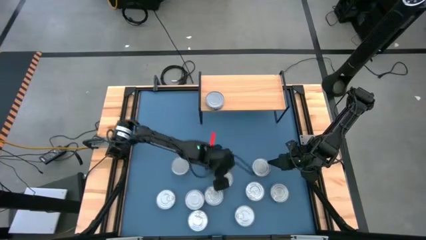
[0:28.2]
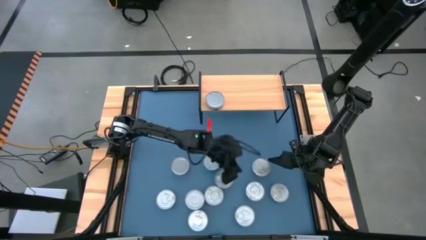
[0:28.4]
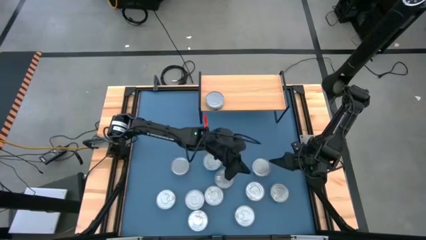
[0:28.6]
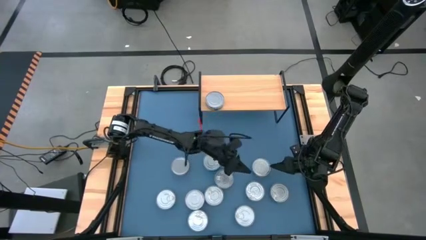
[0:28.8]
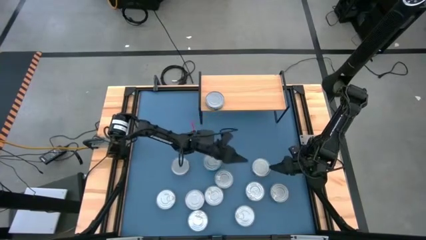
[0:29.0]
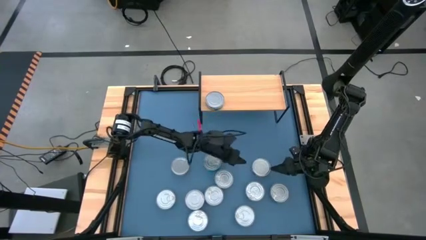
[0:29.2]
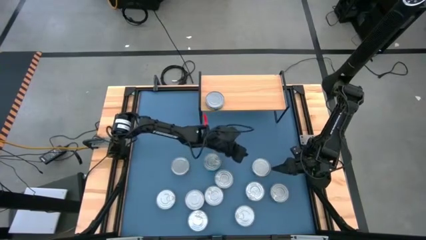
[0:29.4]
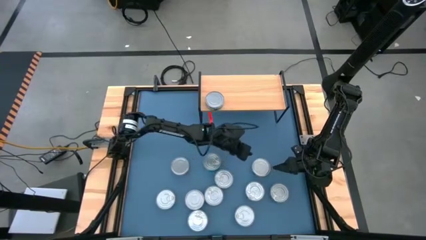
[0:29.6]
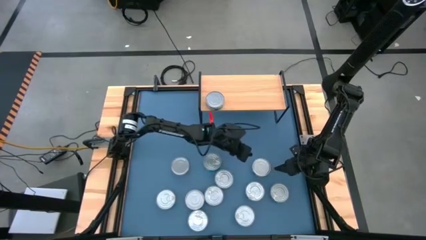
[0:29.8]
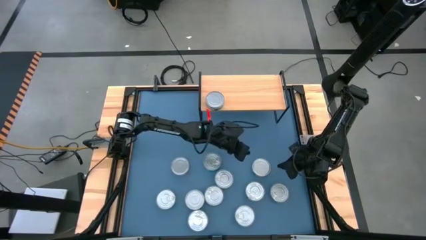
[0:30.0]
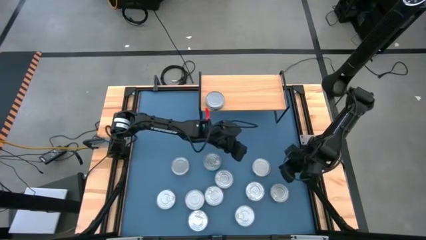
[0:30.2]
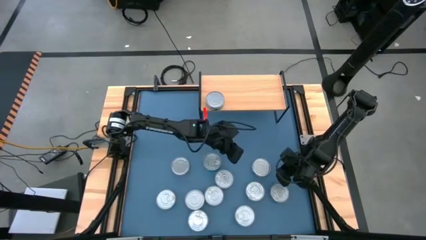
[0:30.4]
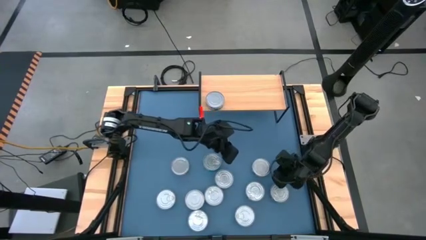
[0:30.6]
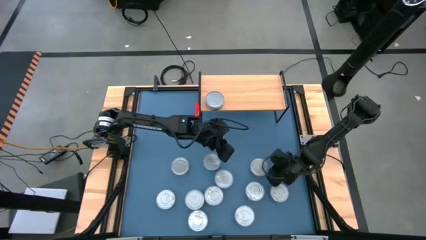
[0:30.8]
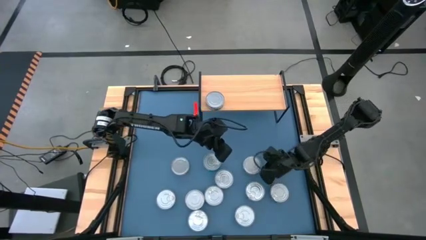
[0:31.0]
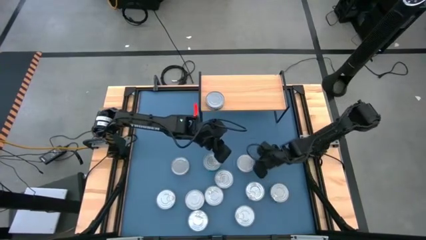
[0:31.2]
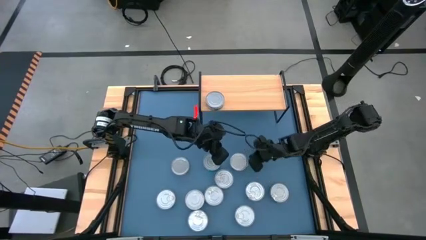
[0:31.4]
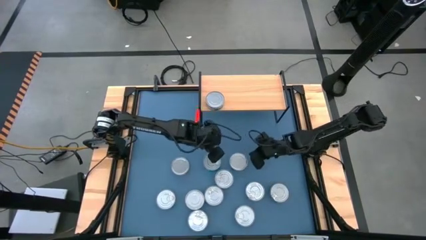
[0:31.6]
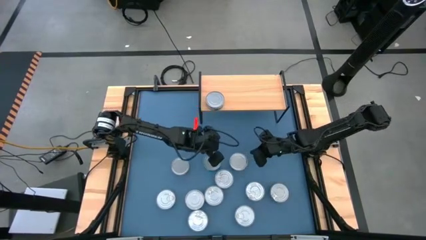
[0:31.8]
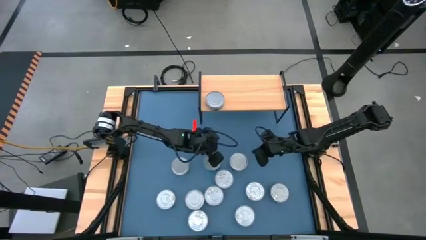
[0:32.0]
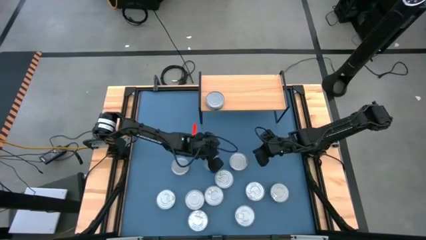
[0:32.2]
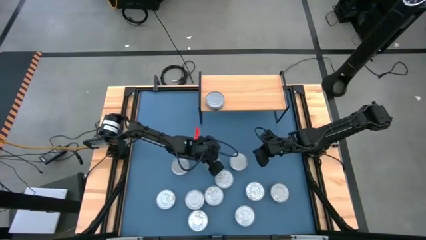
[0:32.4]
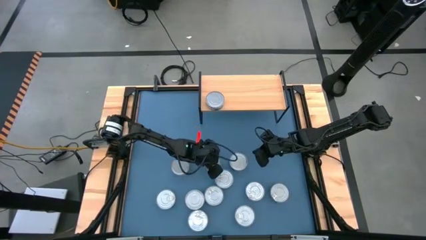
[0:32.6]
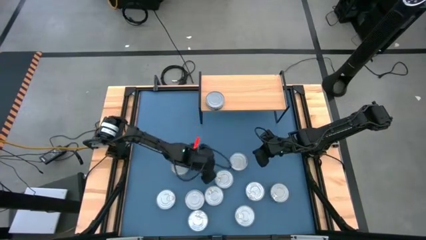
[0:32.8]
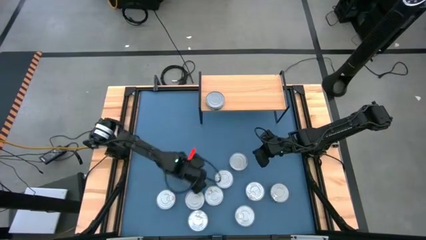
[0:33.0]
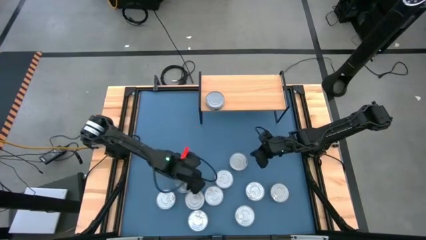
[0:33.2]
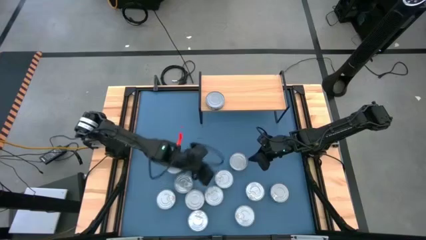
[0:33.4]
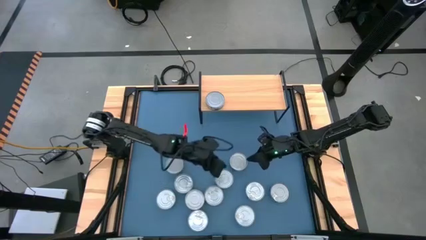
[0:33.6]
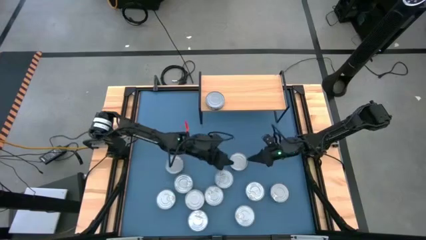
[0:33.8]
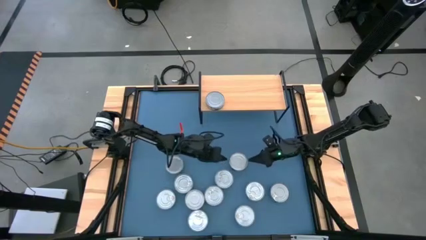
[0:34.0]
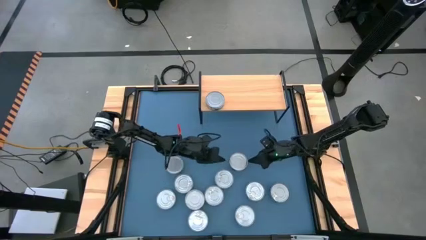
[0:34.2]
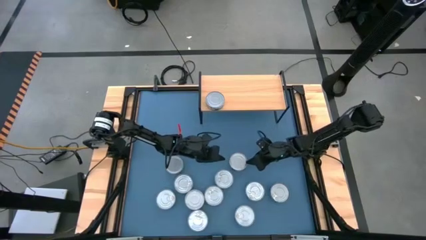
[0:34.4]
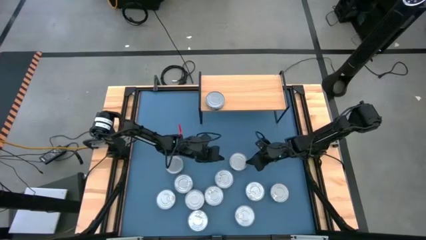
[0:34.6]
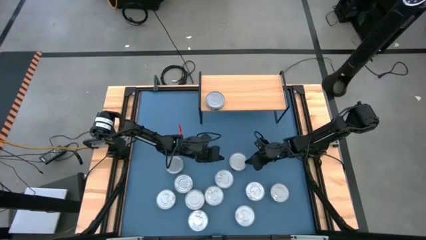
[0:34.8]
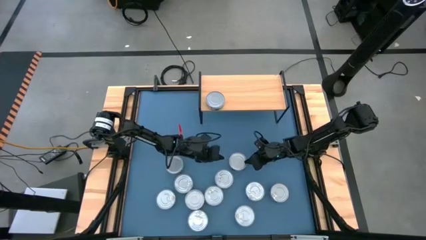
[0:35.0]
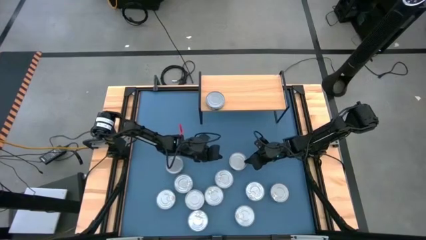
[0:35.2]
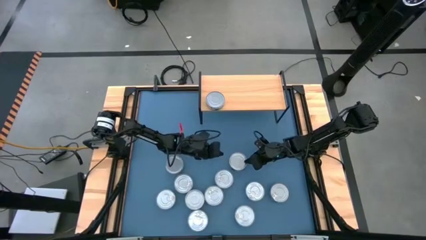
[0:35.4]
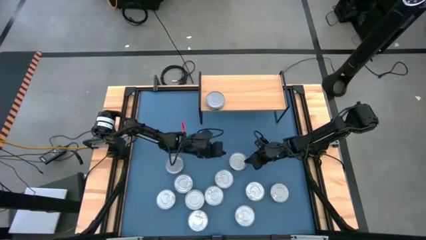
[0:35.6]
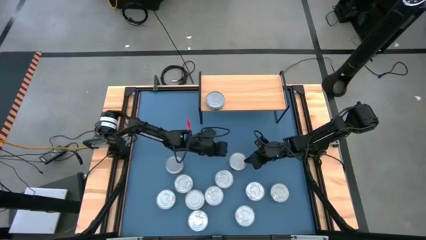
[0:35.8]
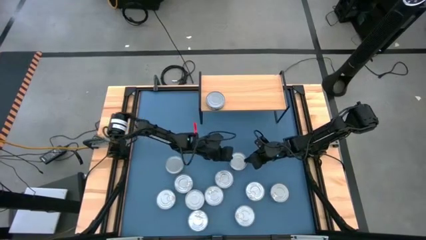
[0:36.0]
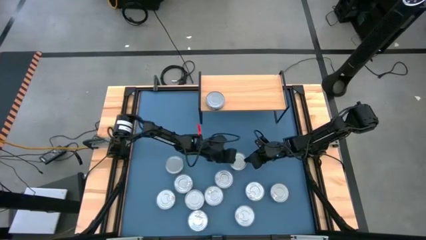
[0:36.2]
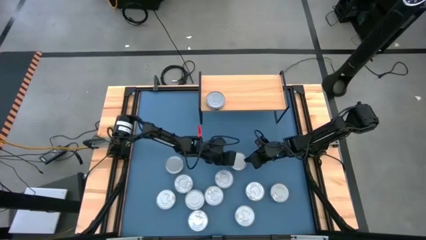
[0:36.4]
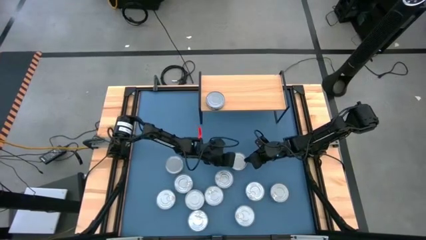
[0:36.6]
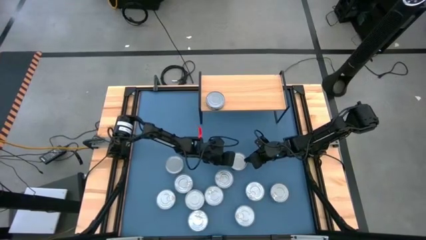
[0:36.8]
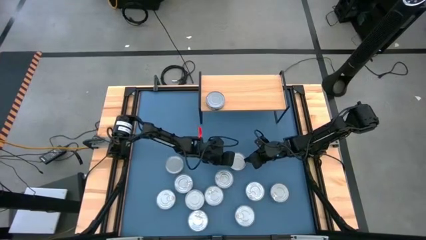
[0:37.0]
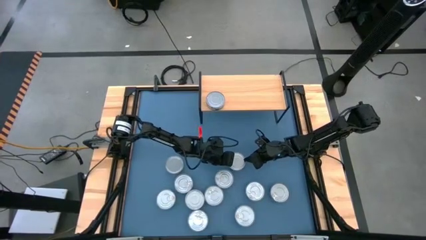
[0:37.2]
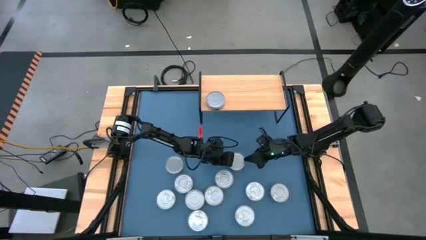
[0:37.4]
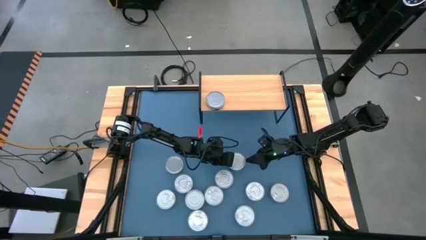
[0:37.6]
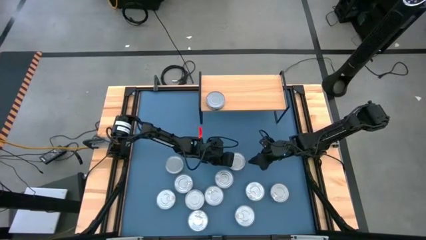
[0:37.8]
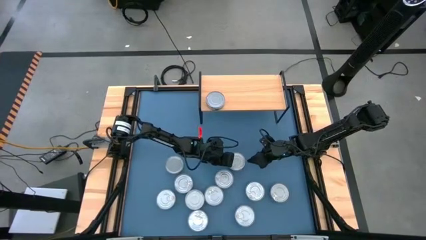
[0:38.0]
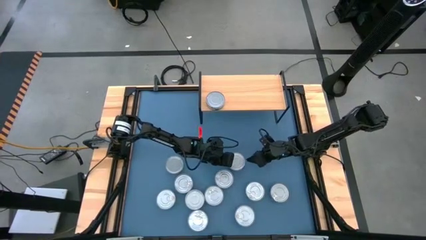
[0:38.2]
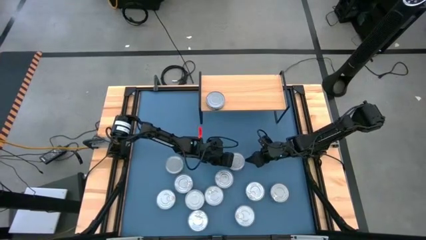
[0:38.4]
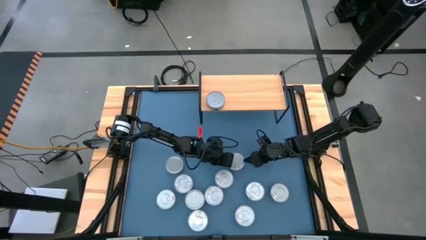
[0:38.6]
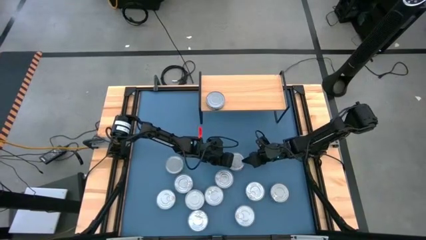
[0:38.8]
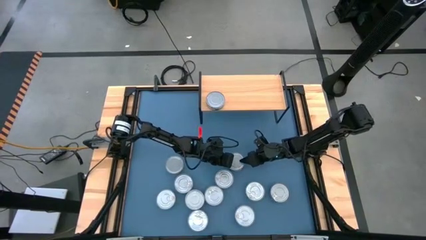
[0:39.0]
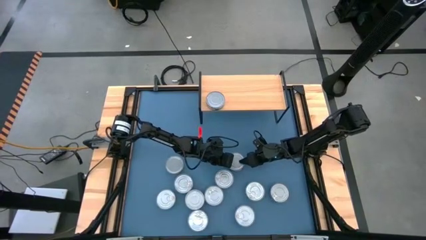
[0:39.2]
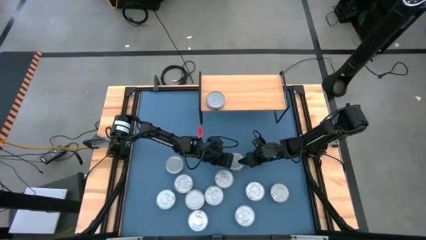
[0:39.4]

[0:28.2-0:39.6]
Task: Stack canned seafood by type on shelf
Stack the green tuna can on top of the green tuna can on the shelf

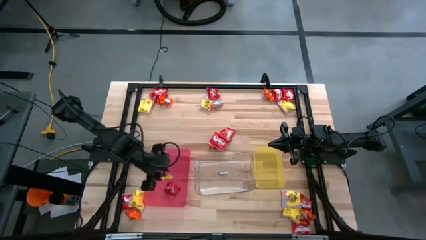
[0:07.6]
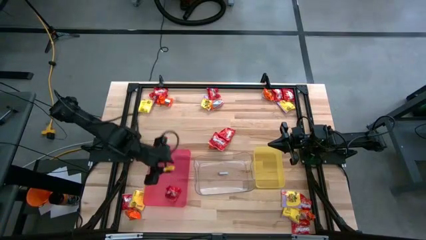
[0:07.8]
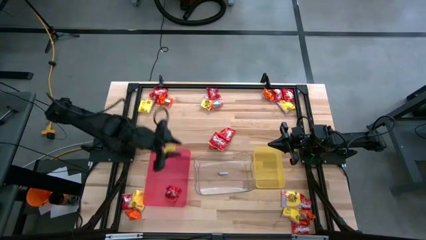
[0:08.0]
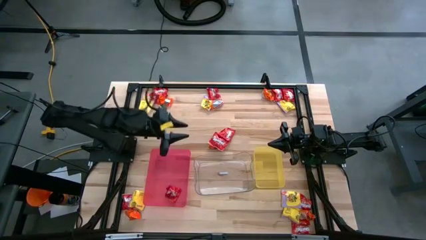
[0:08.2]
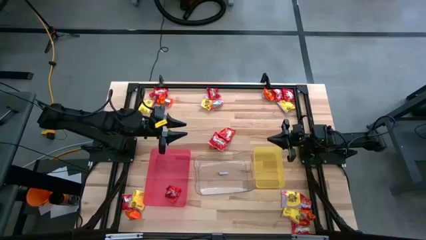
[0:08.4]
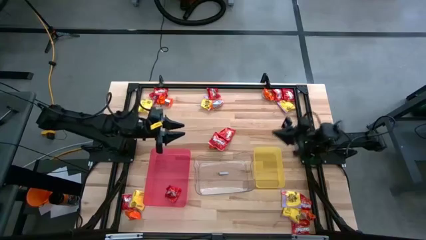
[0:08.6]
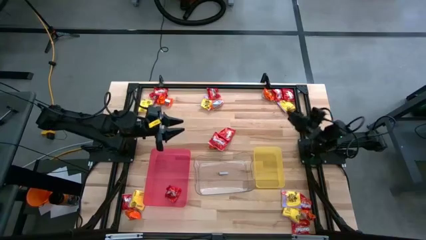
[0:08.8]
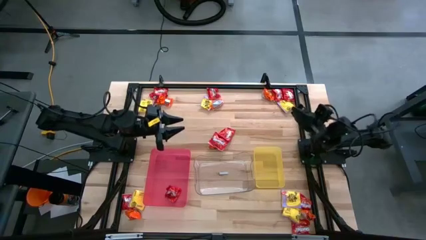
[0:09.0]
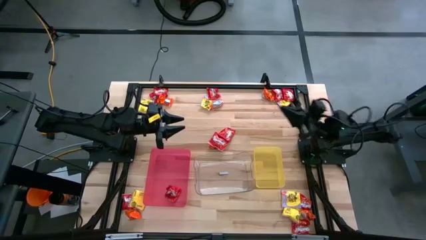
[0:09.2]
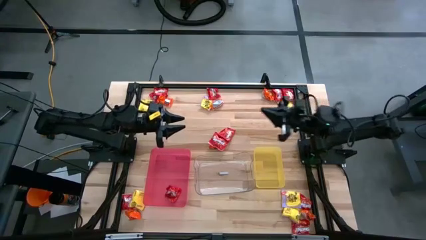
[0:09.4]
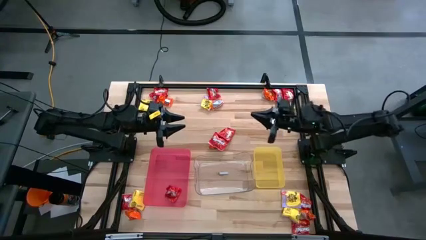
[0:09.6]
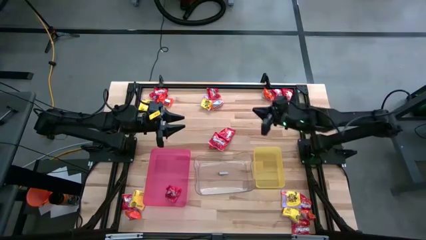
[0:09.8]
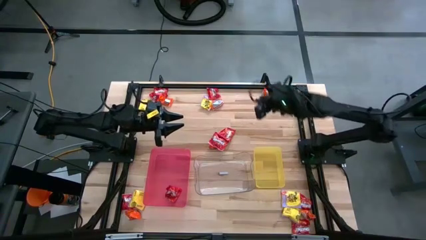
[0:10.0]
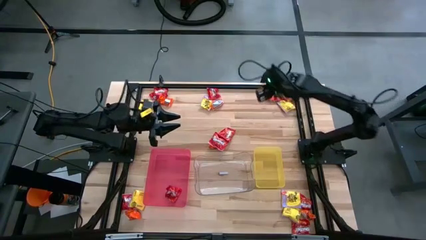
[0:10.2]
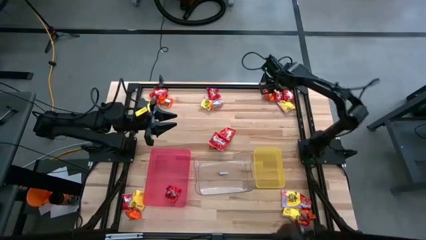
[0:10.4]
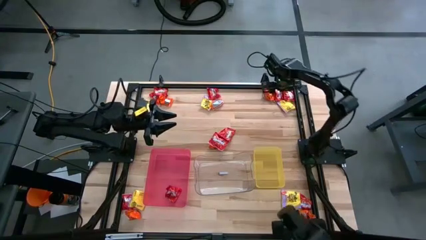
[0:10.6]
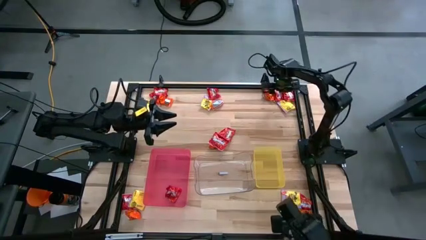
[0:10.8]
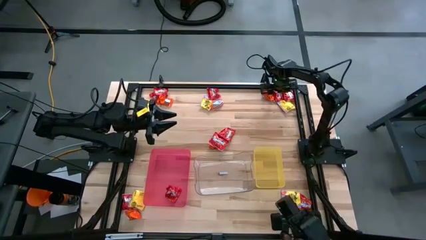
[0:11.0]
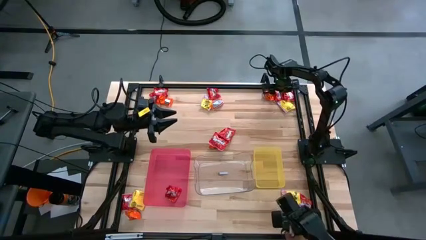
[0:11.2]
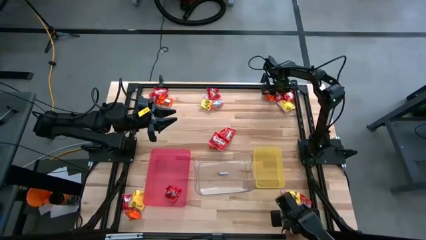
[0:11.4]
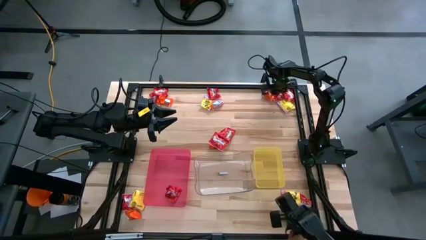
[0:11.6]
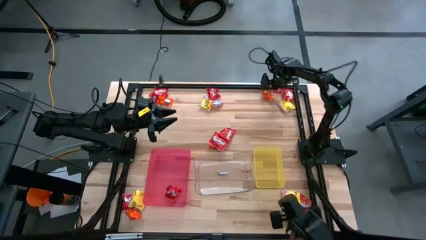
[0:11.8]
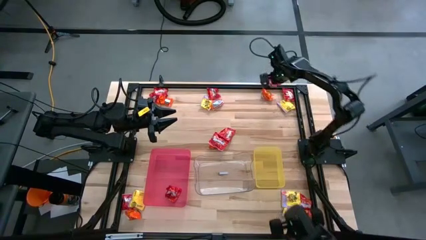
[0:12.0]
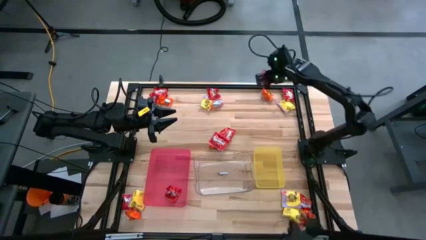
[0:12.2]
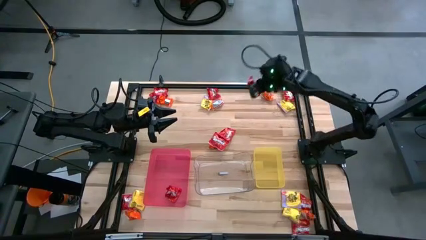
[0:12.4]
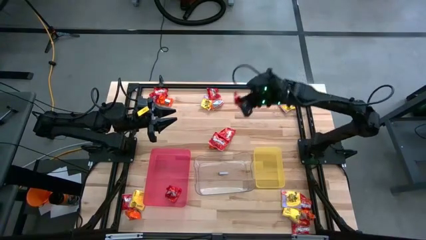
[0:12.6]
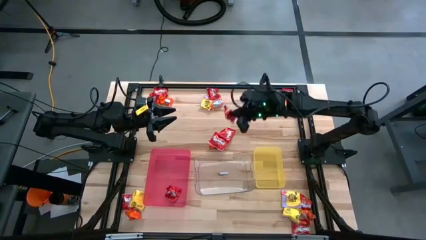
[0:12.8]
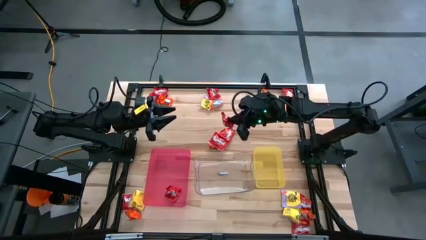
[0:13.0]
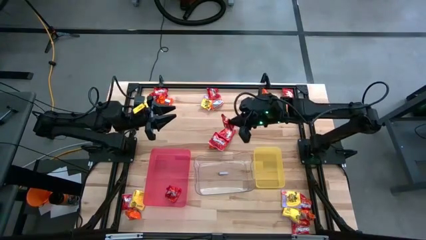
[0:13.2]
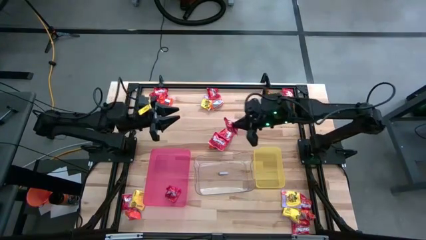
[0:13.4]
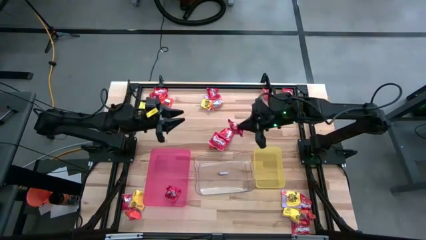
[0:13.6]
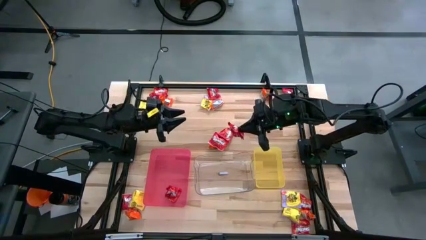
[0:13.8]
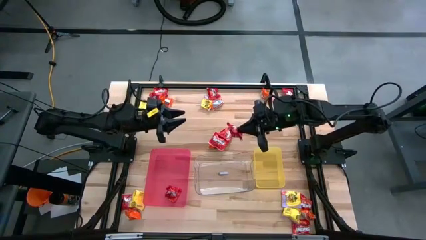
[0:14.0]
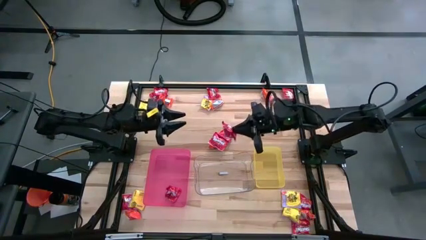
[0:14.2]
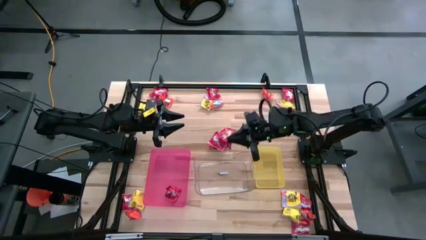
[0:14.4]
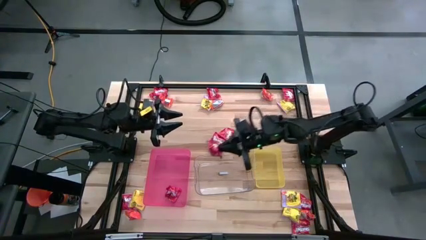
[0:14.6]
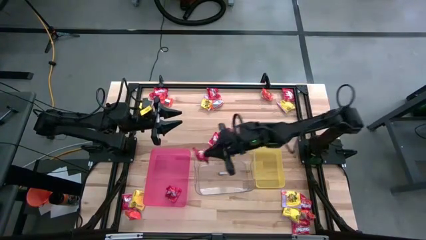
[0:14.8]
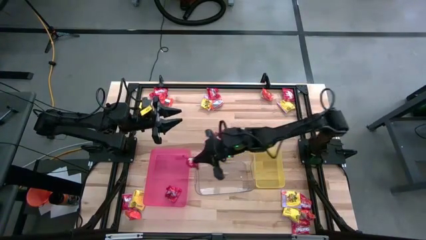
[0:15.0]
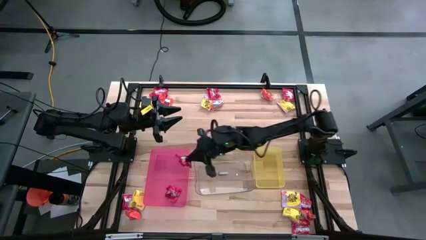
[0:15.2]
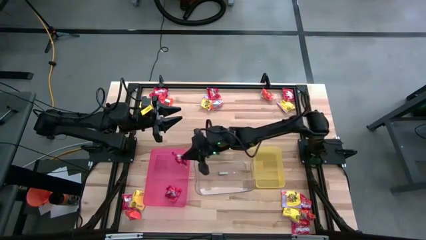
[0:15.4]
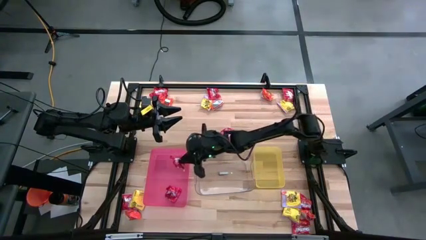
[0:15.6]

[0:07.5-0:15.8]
Task: Sort candy
Put the red candy into the red bin
